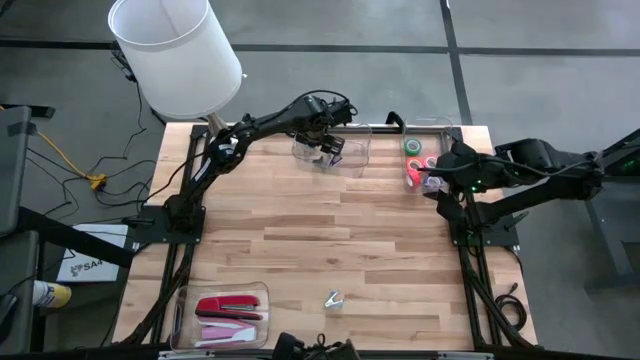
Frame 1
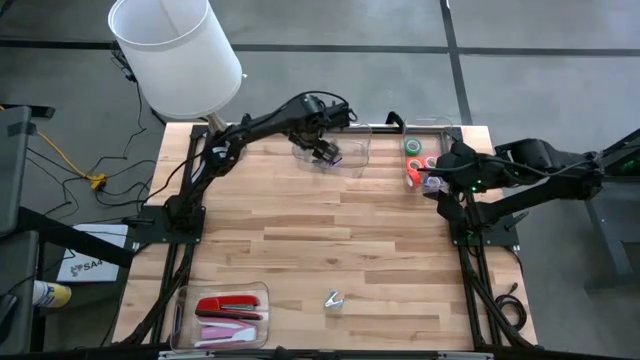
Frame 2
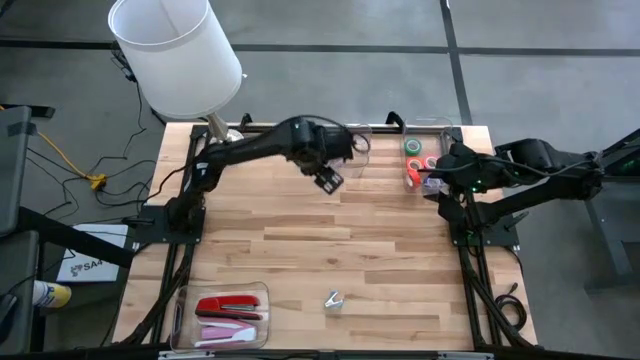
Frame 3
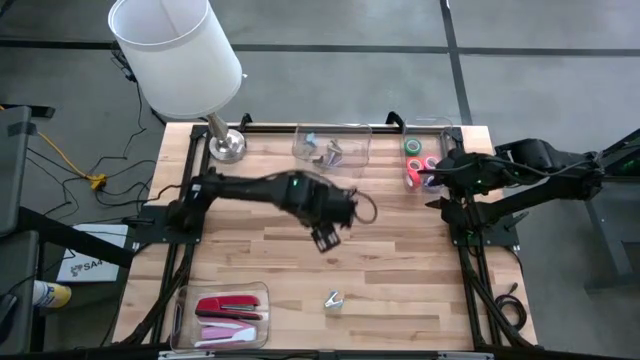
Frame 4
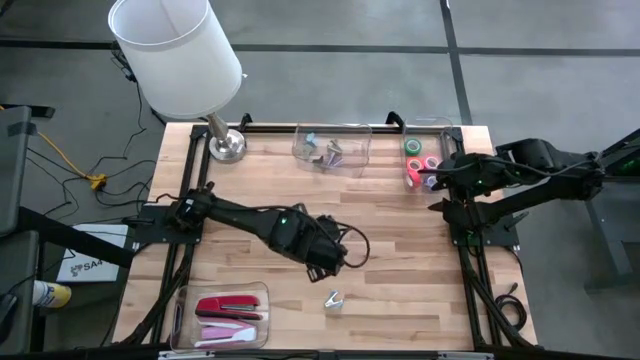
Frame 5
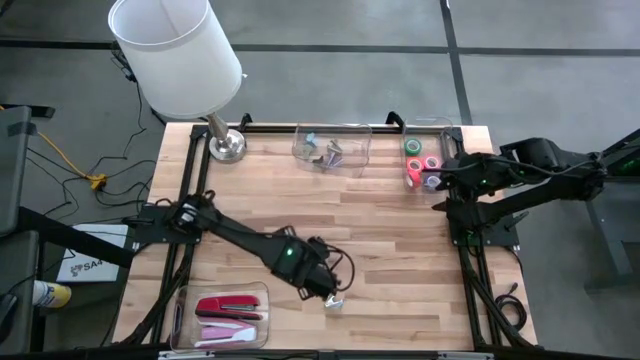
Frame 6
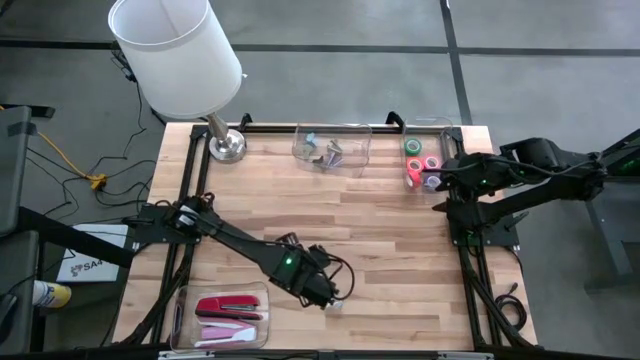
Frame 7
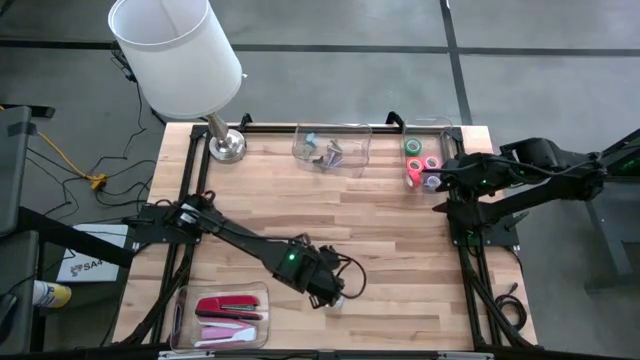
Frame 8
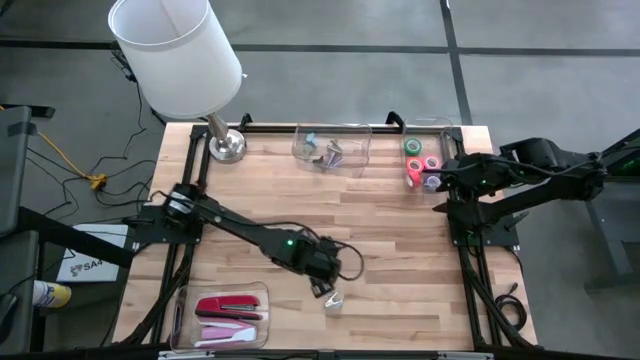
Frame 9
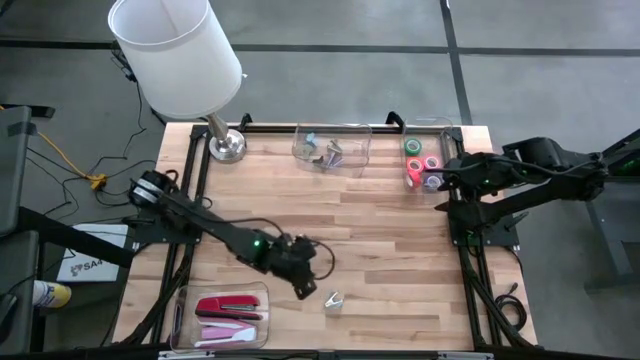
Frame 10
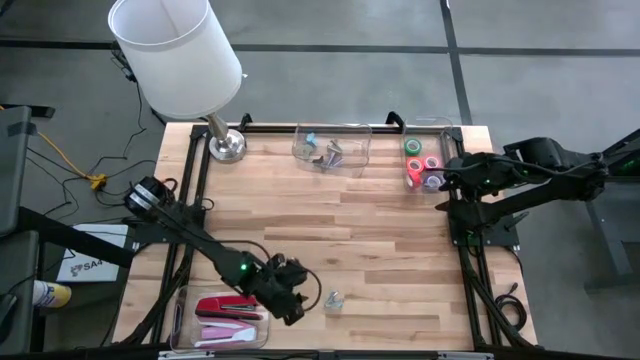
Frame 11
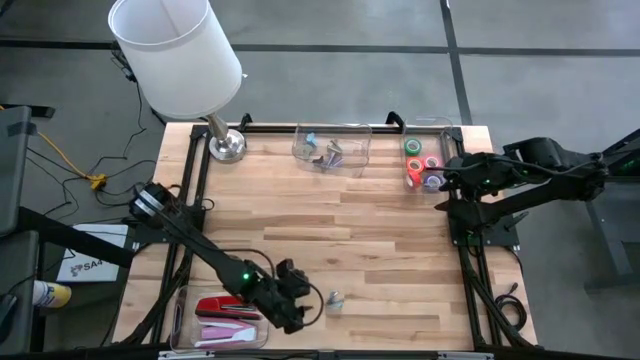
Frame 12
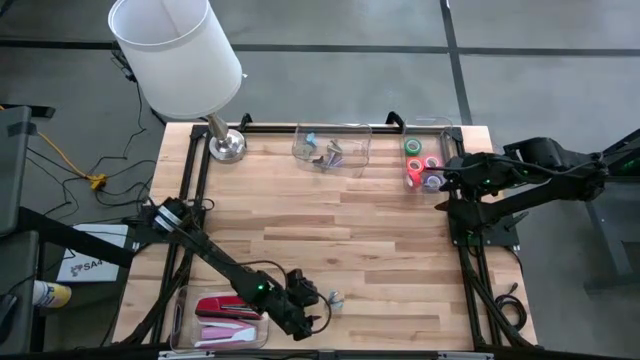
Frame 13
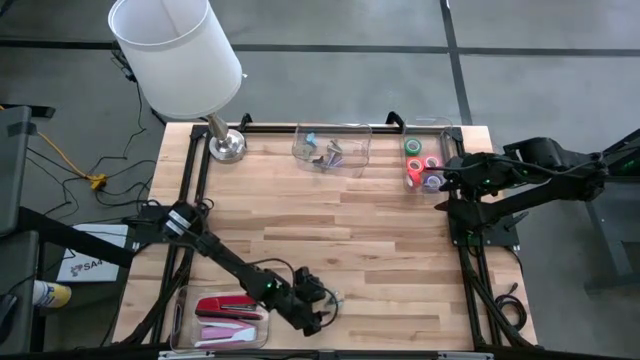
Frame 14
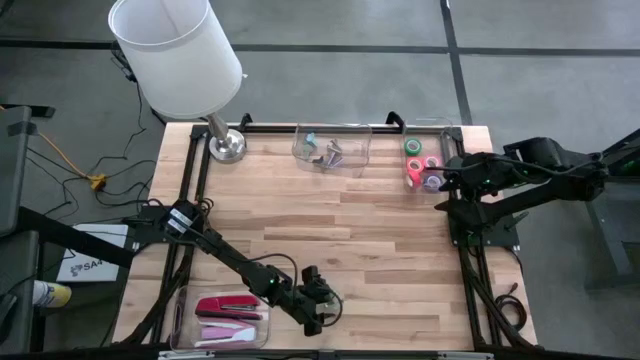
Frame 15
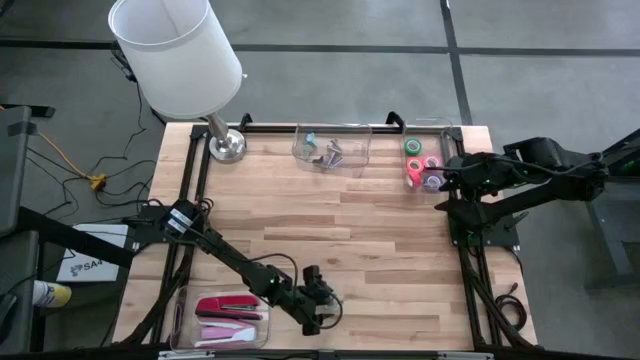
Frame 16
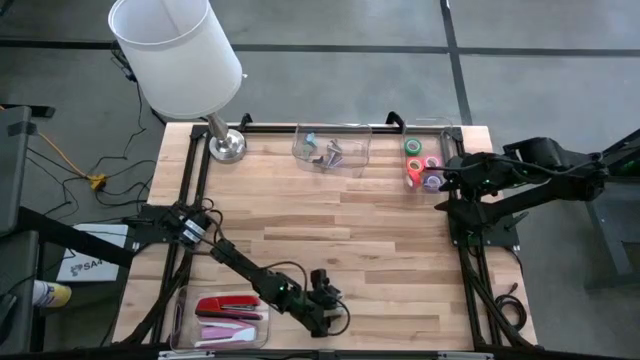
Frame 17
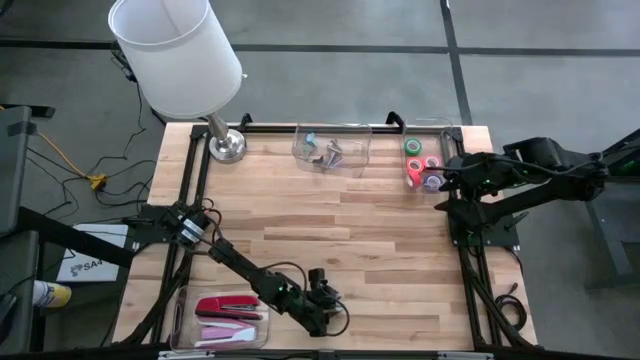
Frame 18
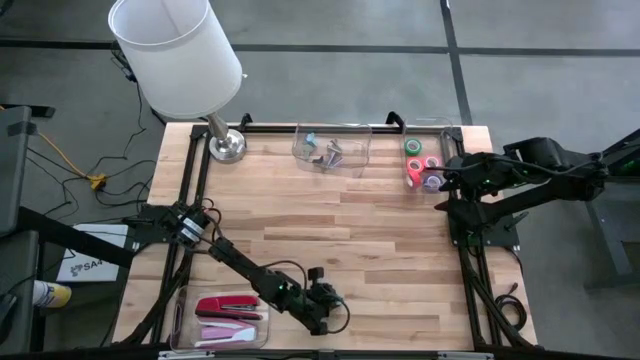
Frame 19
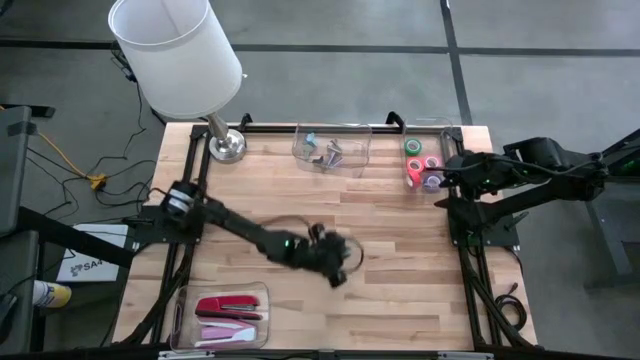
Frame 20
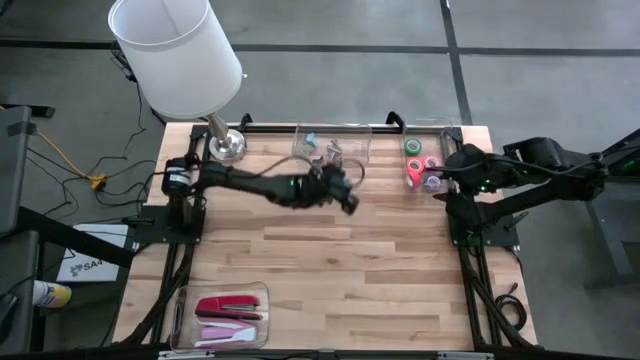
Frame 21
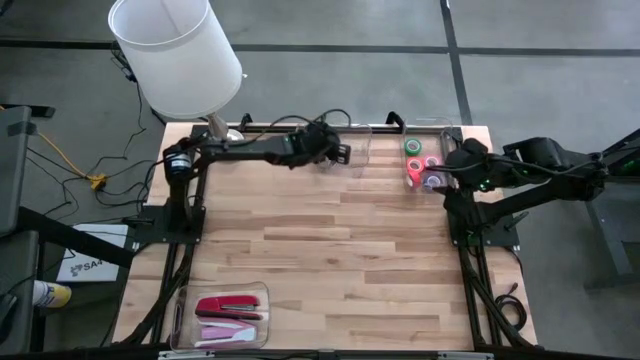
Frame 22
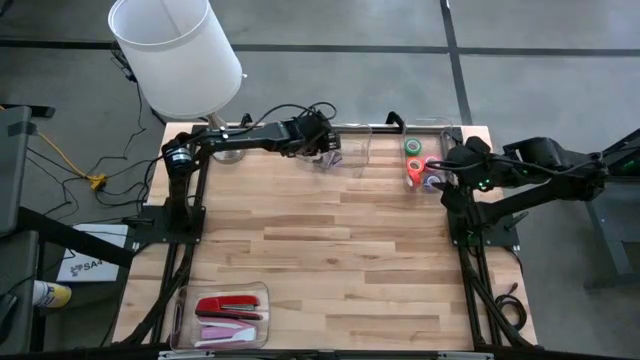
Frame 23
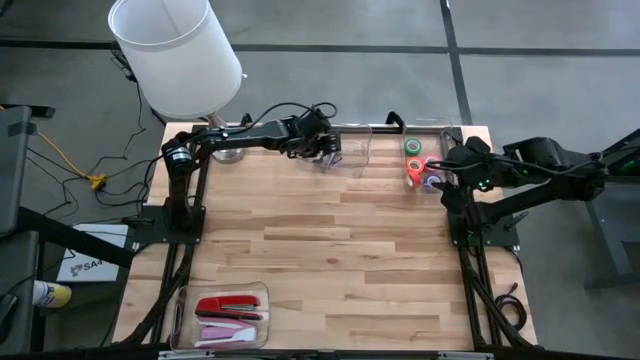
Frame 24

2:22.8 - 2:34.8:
Task: Pick and place Stapler, Stapler remover, tape
Put the blue staple remover into the top left transparent bin

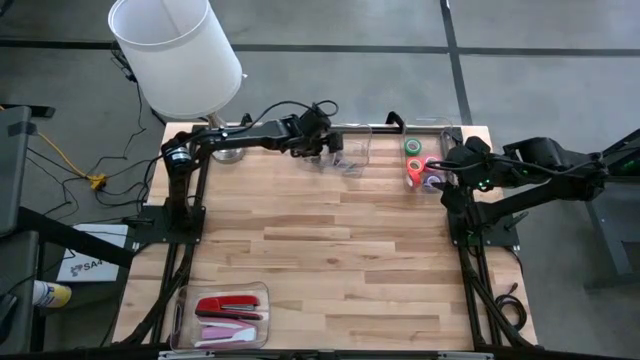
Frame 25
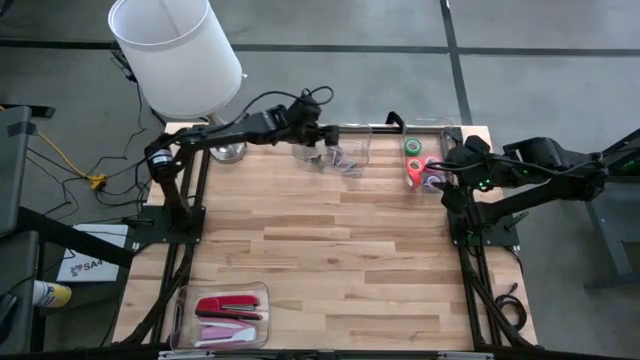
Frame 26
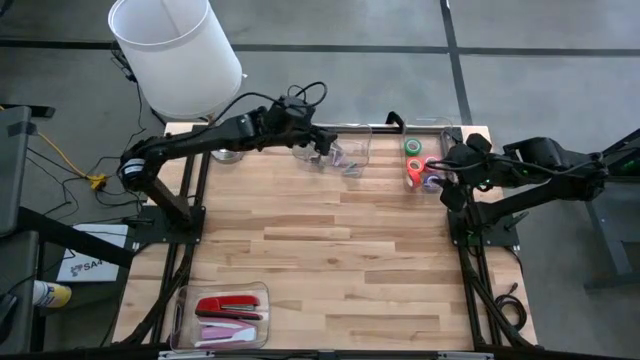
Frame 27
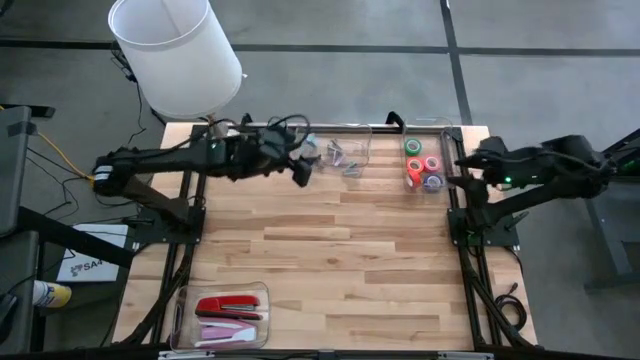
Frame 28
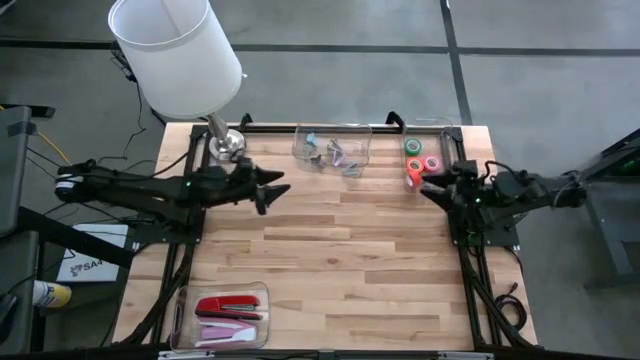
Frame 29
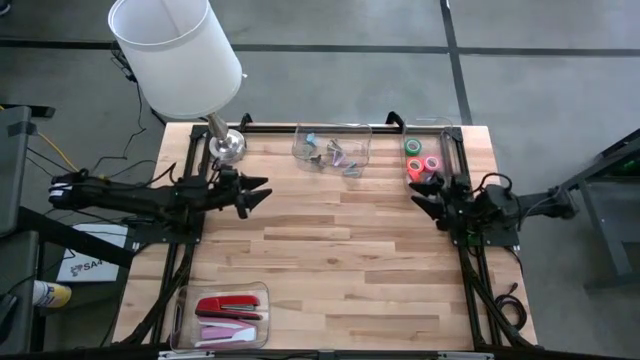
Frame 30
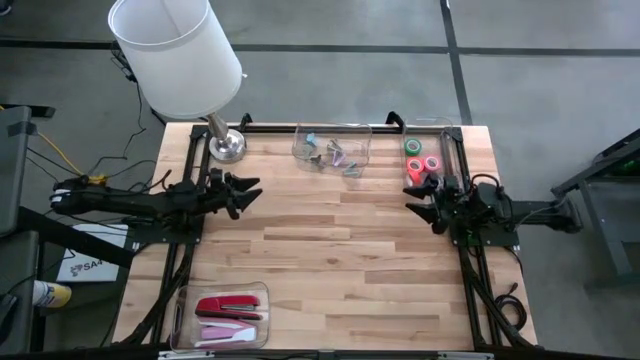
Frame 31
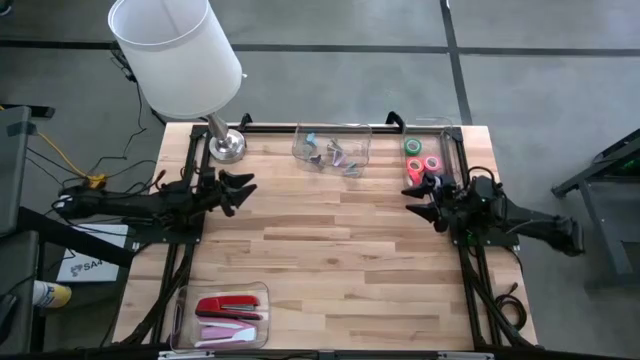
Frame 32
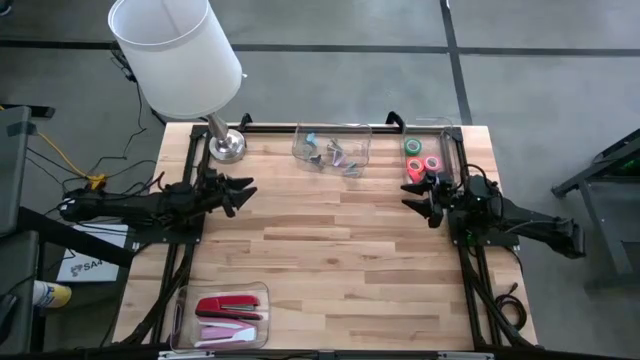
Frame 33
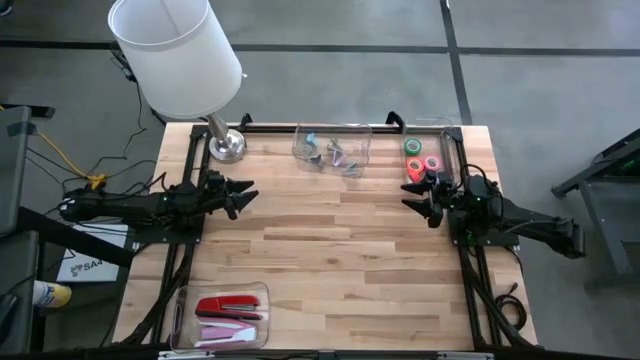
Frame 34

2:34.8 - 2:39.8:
Return to Home Position

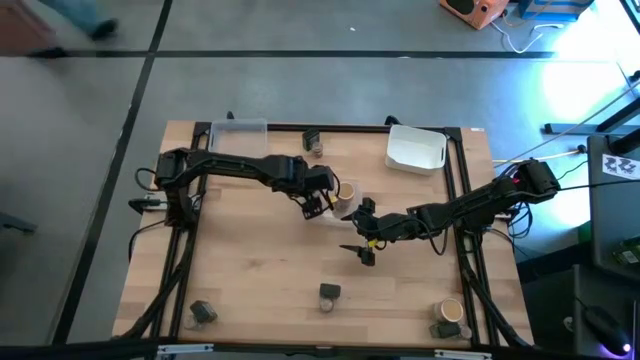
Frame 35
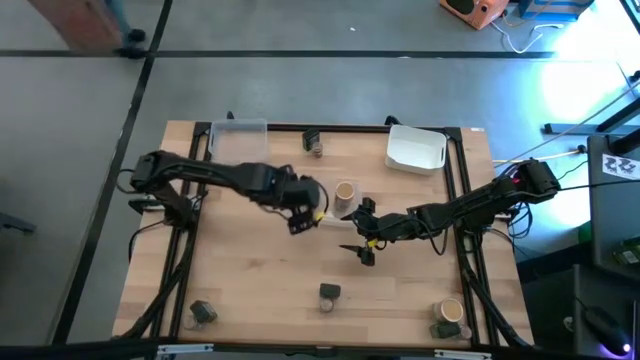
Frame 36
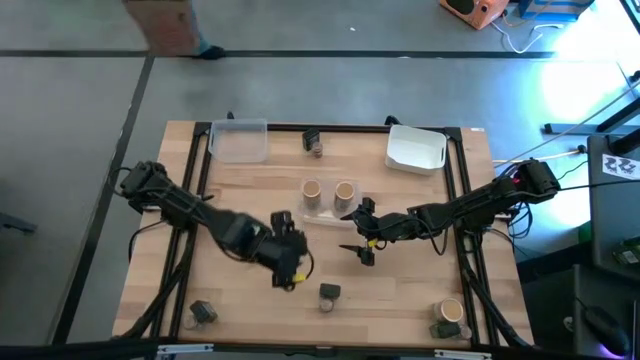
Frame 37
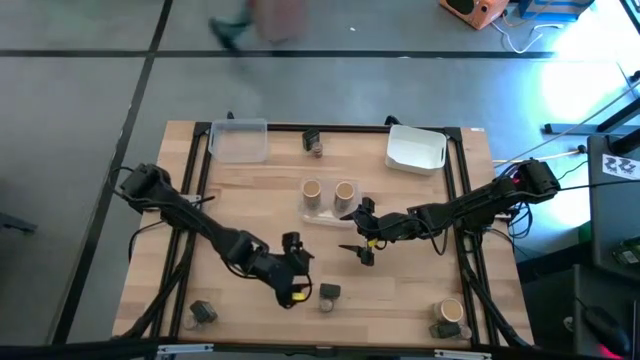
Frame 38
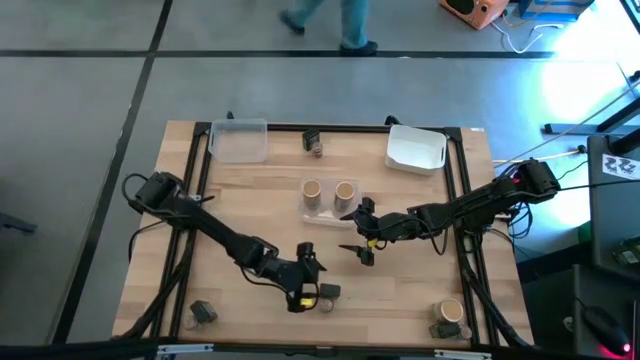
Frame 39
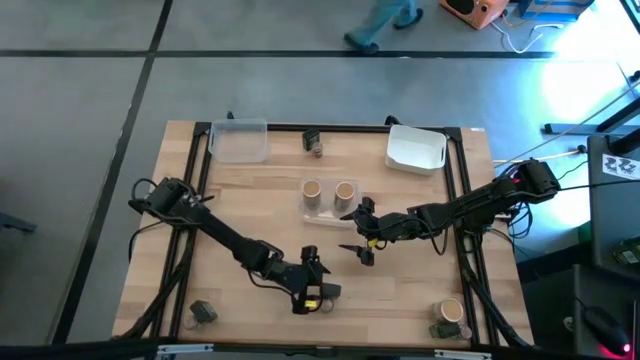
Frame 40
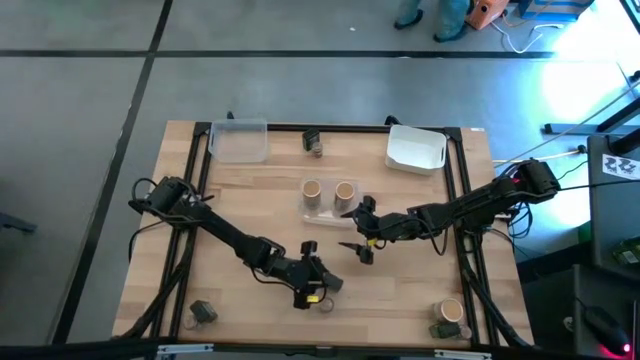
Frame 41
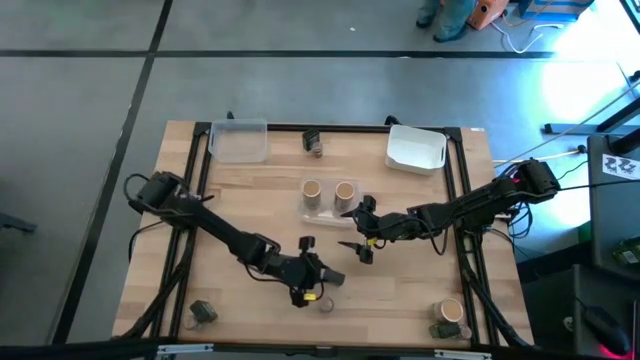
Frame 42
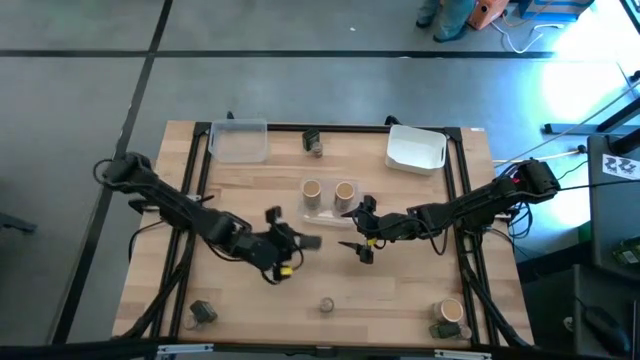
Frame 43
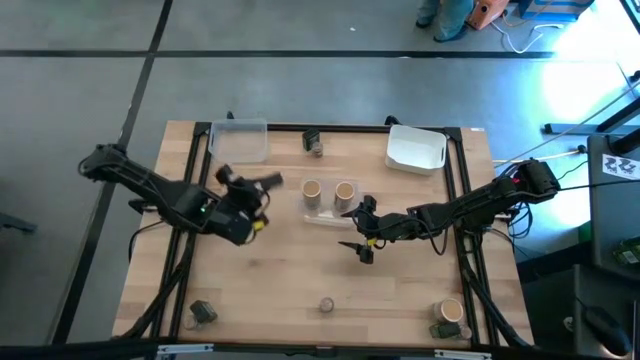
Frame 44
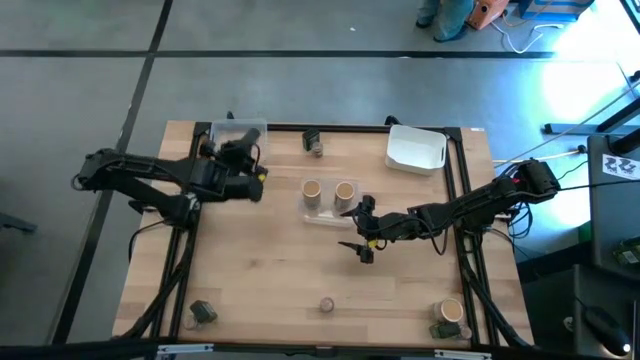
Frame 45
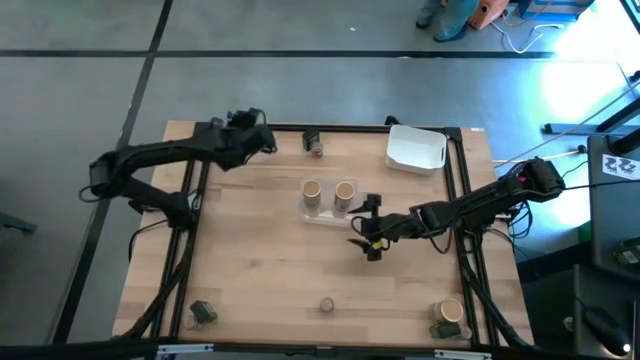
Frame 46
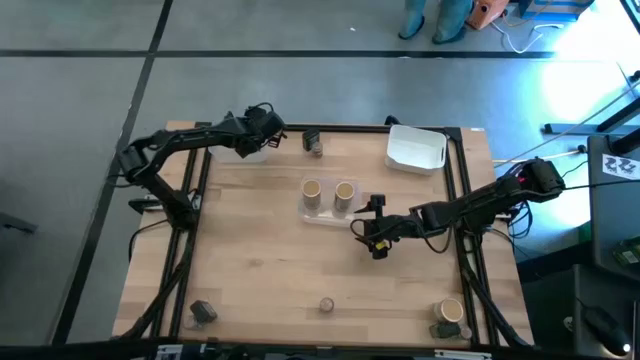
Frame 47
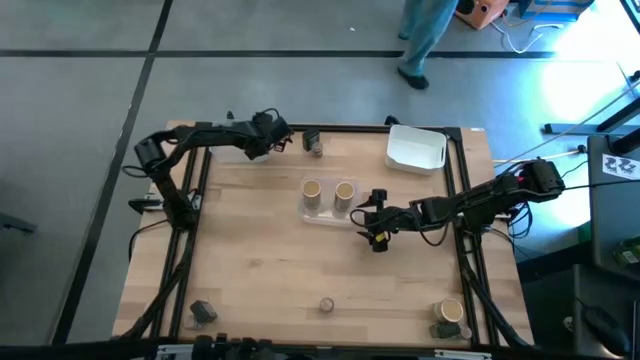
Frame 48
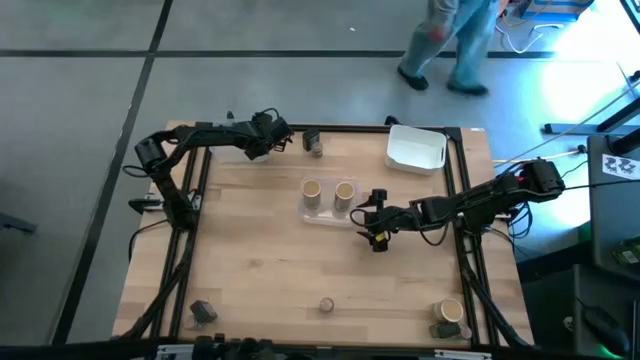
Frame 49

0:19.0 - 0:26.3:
Task: Sort spices by type
Put the black seasoning can into the top transparent bin
